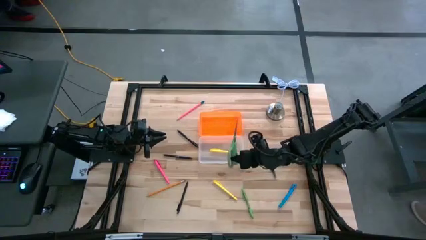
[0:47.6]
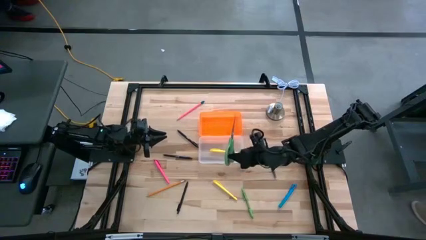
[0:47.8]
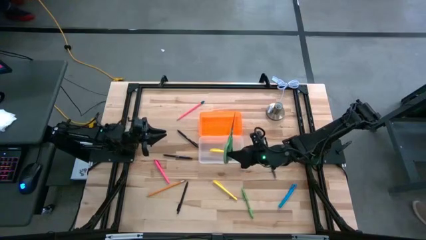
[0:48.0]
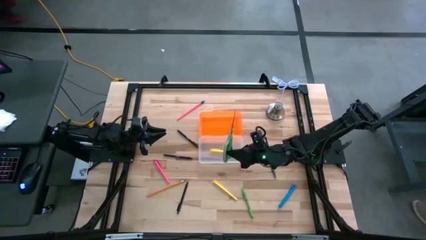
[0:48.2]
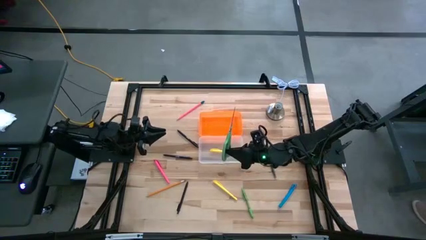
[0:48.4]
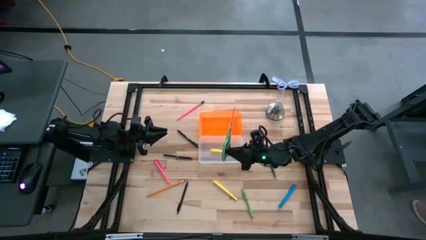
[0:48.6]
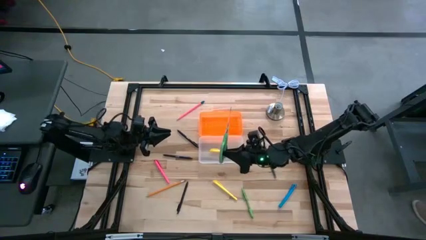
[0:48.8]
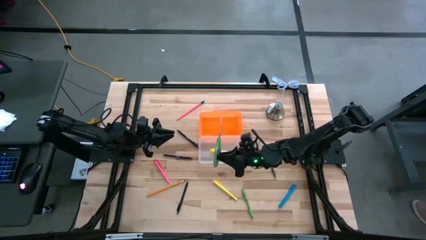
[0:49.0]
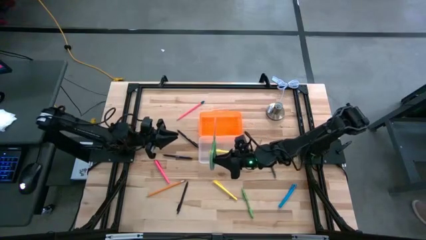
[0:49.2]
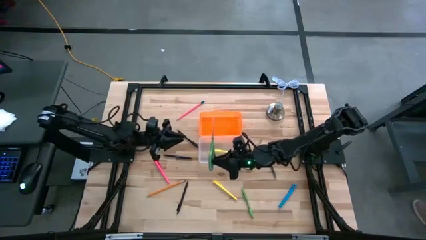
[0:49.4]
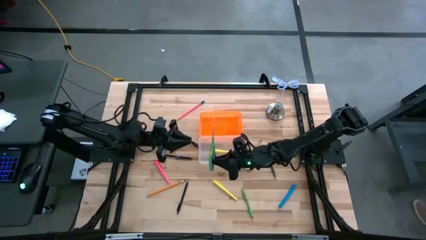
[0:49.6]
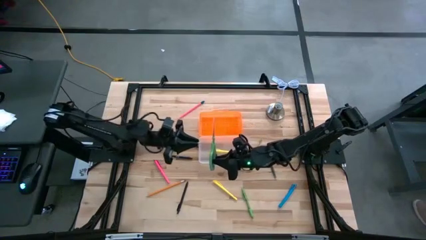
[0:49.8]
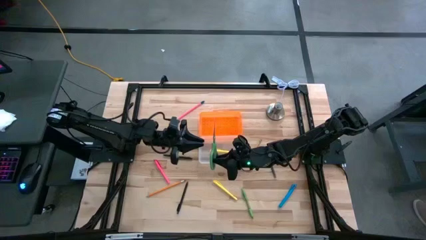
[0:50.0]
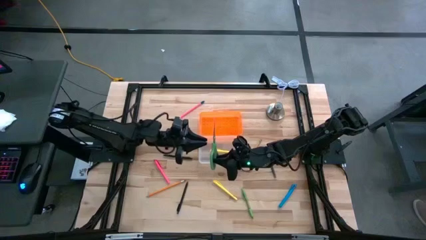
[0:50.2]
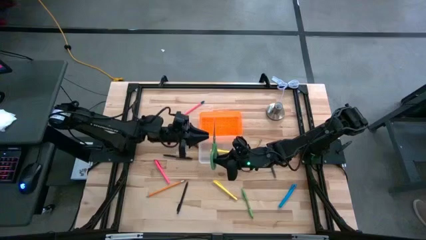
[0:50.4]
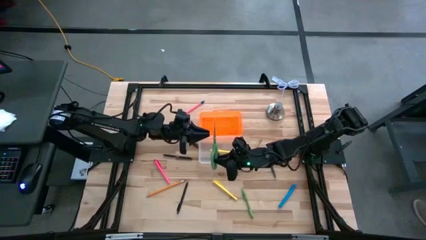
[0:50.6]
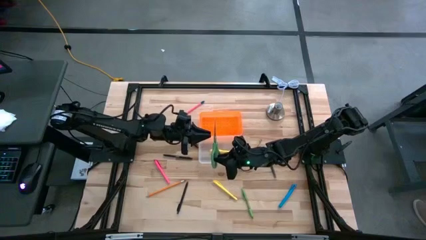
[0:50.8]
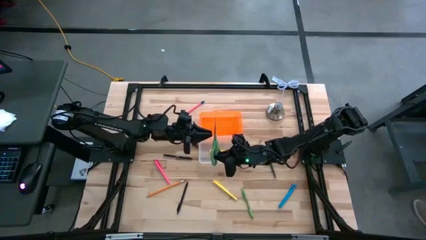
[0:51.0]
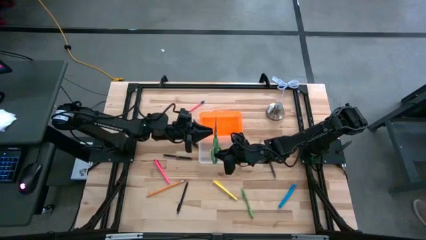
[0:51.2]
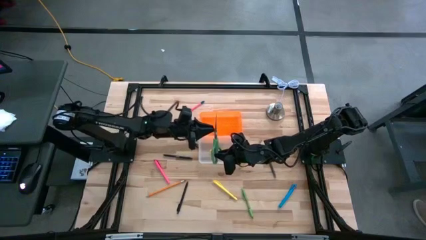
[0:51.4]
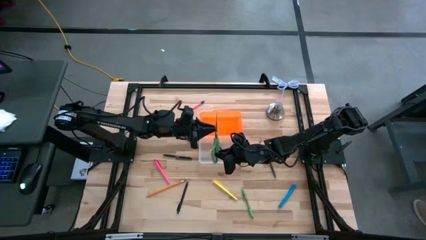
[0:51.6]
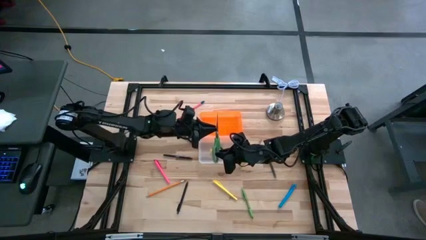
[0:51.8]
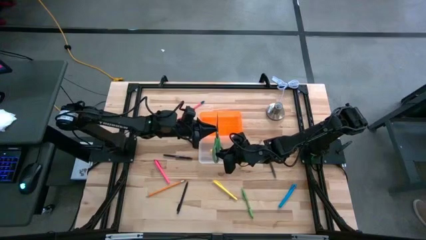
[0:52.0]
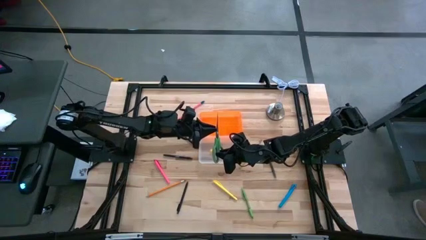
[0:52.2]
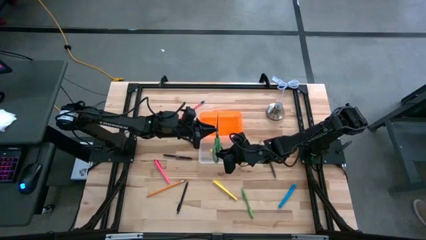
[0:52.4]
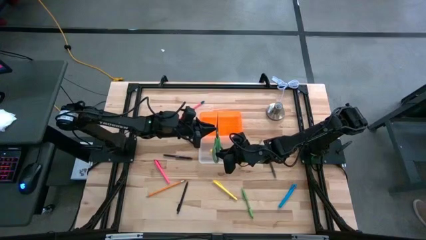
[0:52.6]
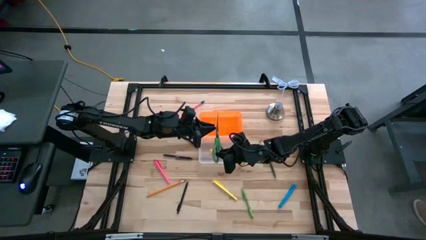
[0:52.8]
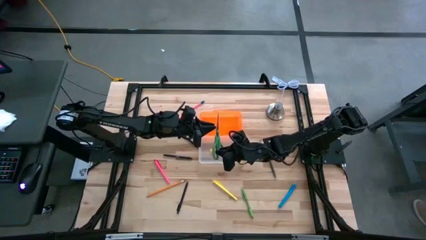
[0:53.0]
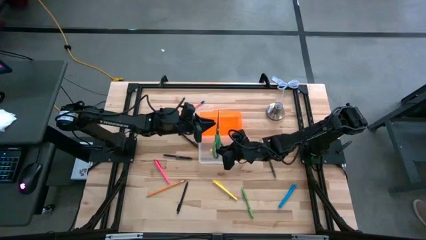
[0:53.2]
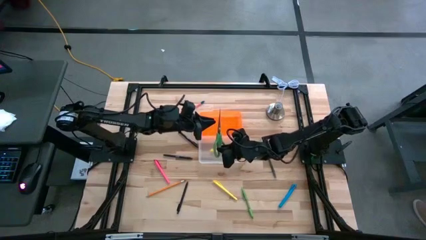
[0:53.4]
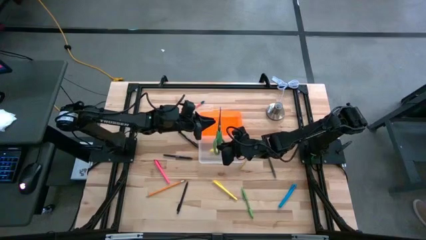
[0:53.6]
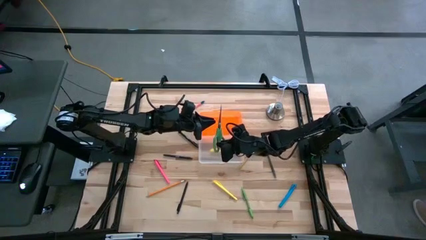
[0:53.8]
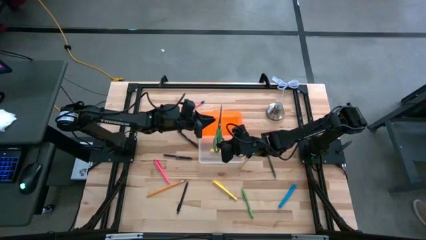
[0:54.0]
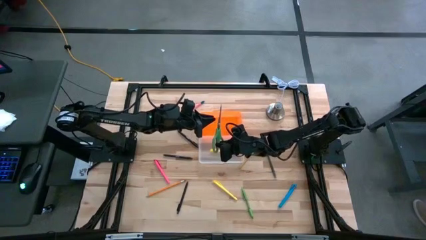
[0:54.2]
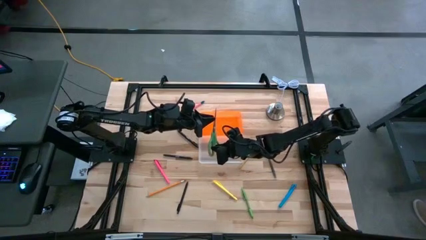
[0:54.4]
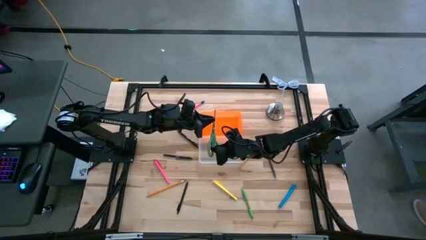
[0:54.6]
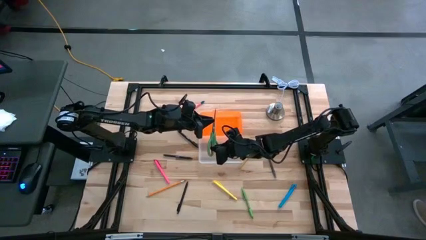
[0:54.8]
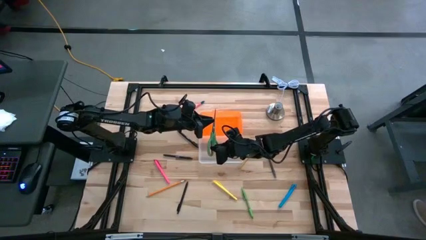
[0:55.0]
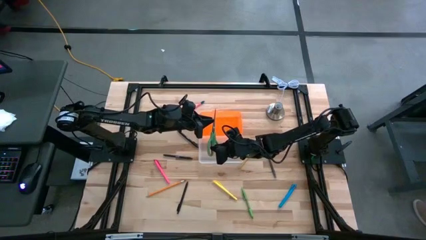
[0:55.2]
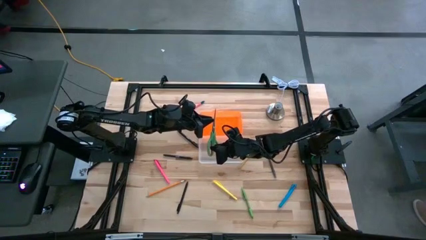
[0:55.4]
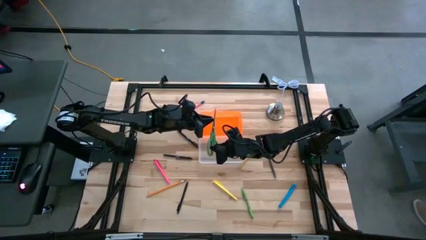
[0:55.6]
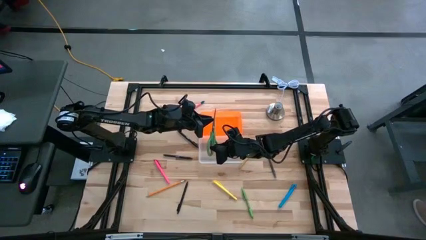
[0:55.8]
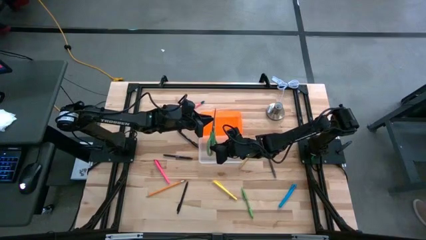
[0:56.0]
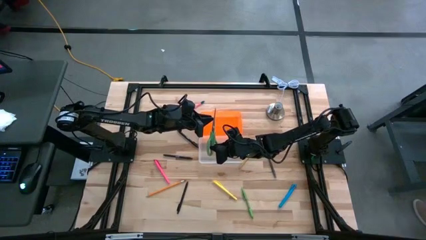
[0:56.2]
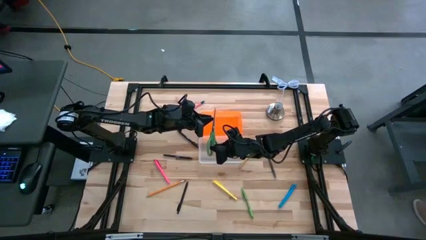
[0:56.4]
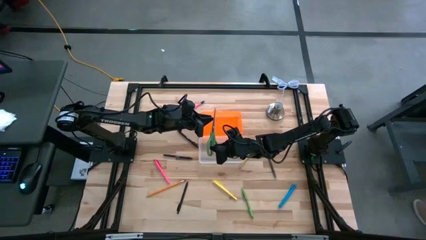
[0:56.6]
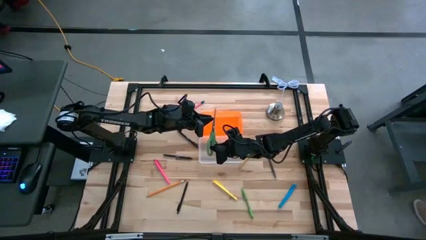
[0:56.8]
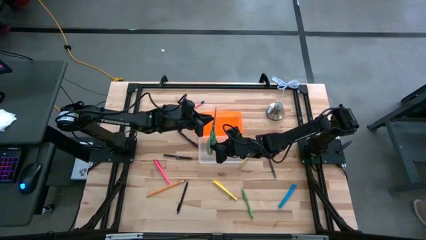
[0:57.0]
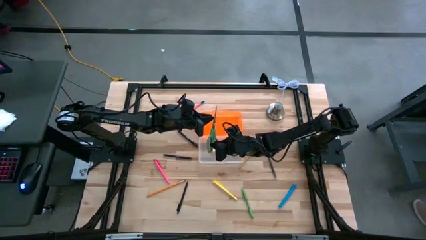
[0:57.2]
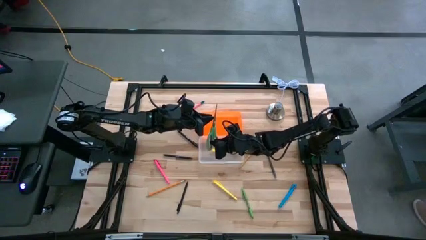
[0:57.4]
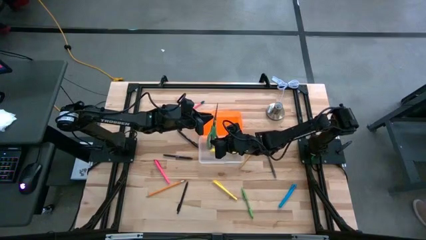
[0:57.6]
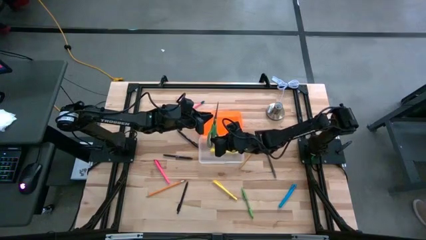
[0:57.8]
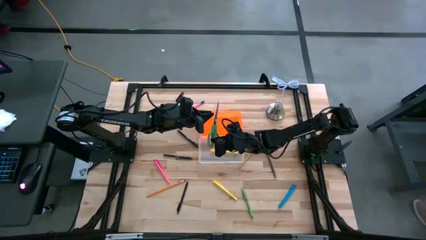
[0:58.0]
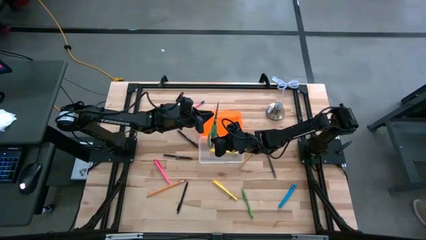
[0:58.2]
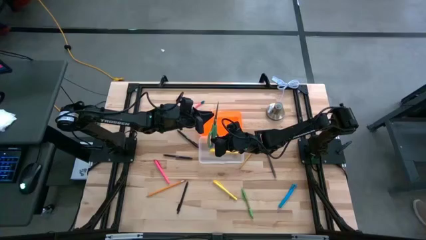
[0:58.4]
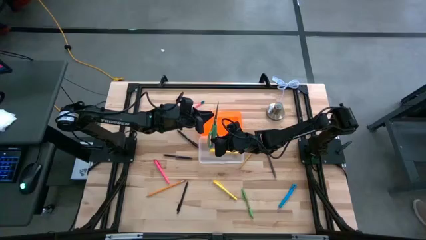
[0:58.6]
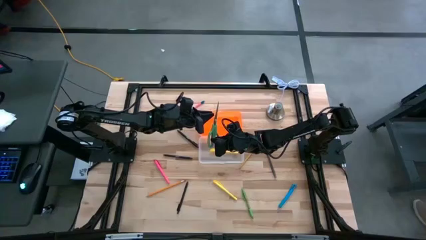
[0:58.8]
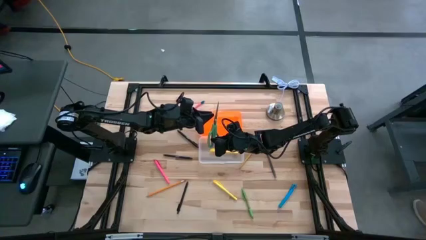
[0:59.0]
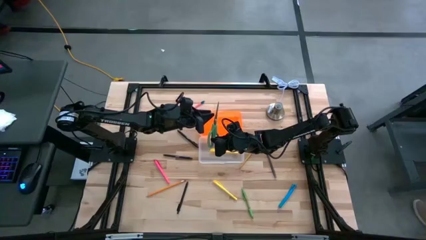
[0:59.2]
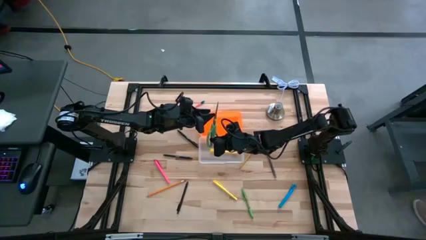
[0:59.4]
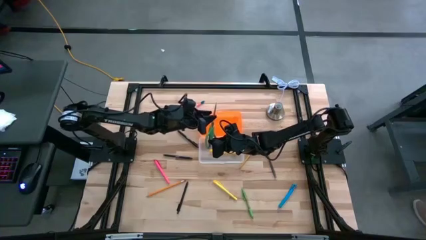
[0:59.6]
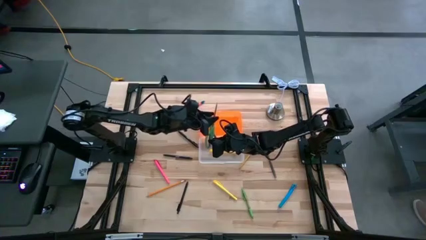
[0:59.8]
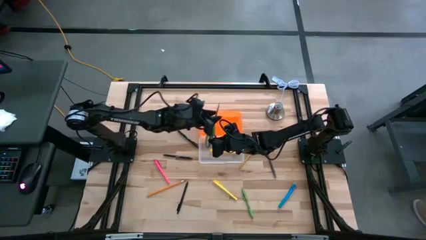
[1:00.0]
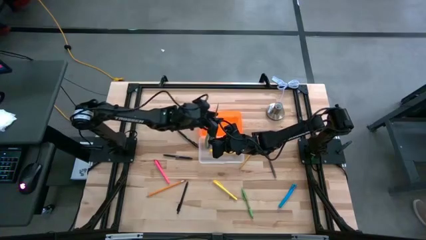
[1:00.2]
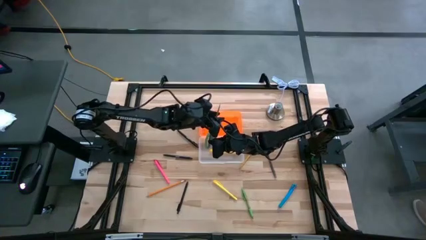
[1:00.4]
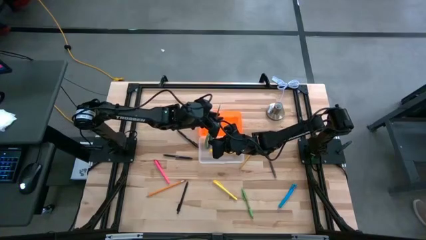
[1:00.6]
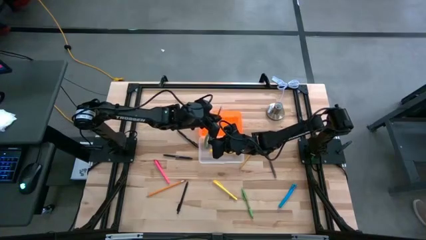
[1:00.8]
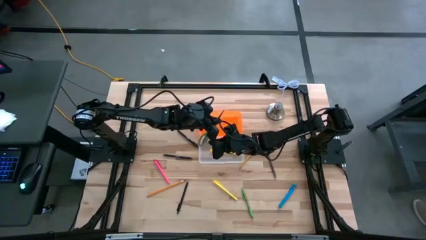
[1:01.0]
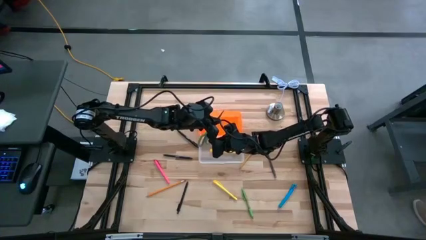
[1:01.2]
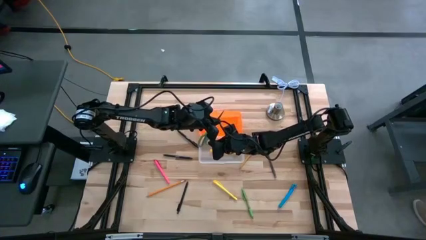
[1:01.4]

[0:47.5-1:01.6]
Task: Pick & place school supplies into a supply box
Put the green scissor into the container
